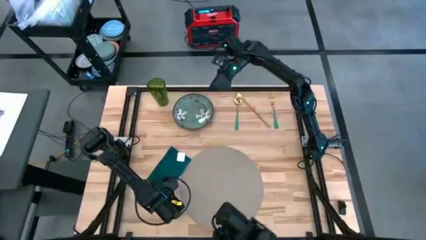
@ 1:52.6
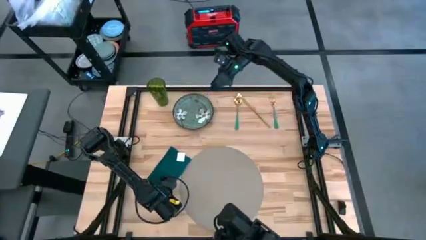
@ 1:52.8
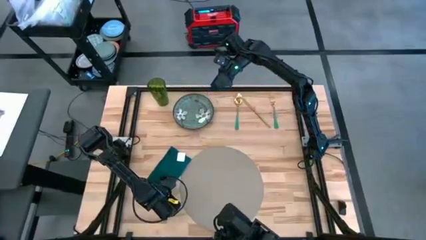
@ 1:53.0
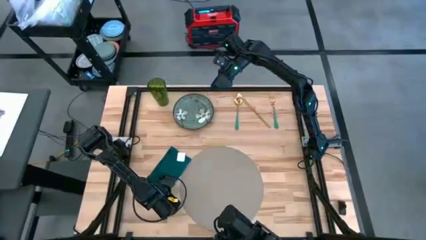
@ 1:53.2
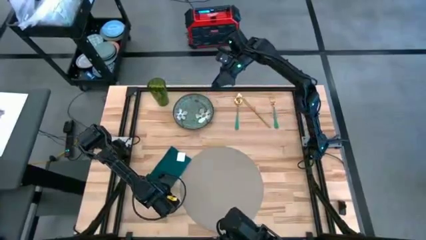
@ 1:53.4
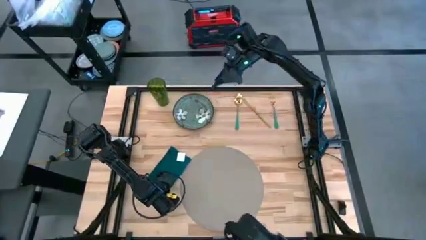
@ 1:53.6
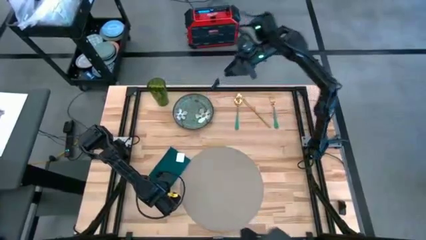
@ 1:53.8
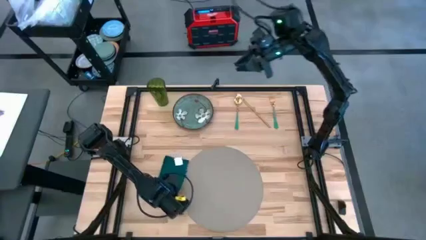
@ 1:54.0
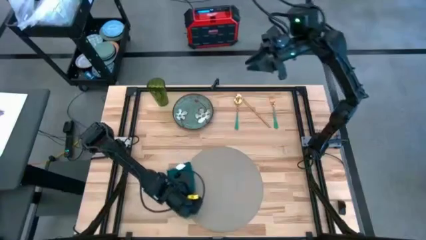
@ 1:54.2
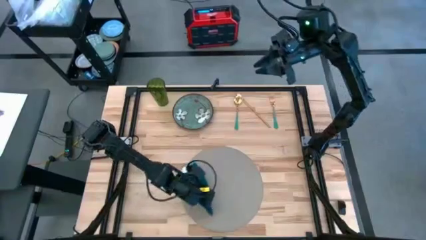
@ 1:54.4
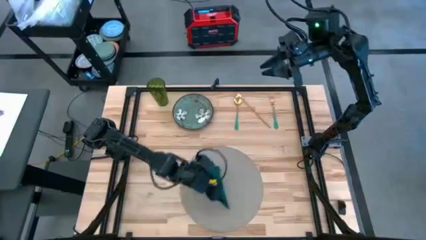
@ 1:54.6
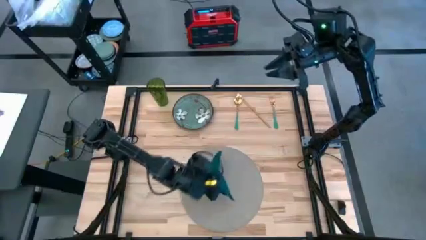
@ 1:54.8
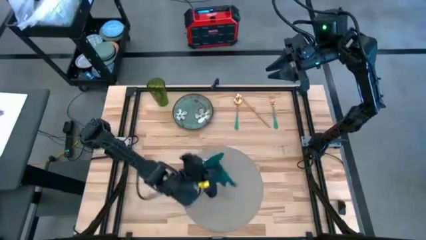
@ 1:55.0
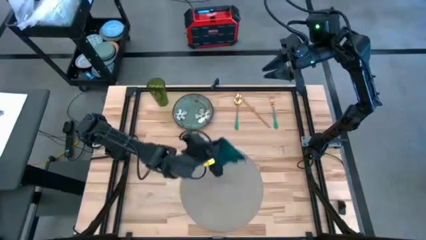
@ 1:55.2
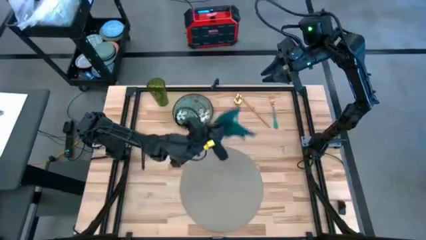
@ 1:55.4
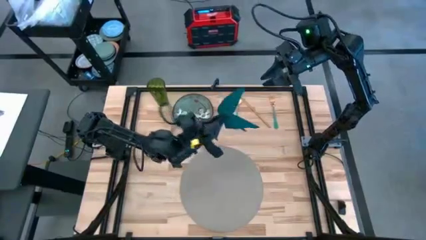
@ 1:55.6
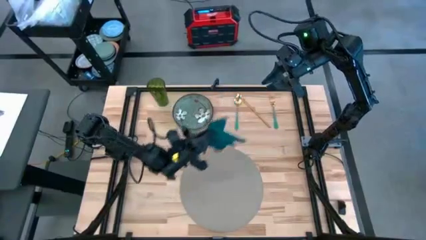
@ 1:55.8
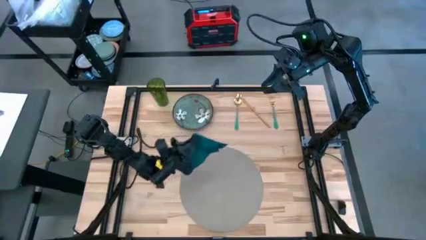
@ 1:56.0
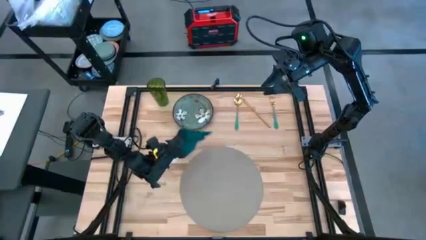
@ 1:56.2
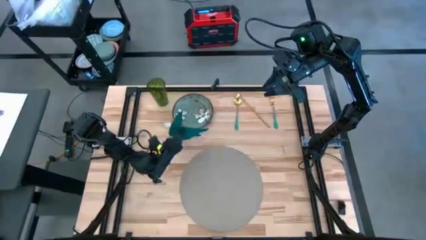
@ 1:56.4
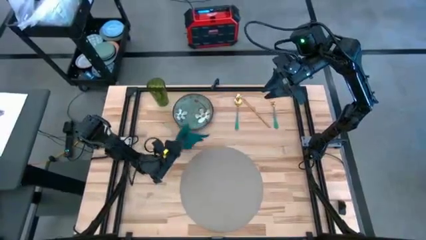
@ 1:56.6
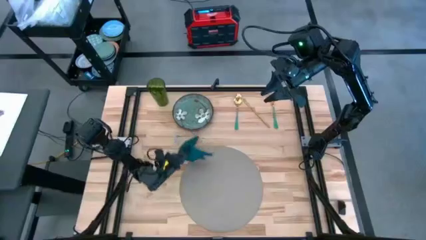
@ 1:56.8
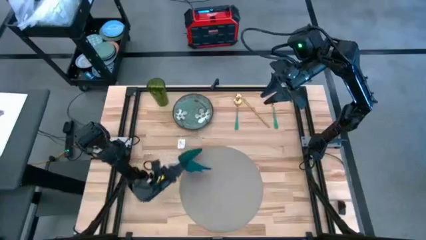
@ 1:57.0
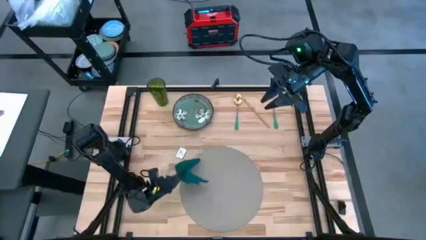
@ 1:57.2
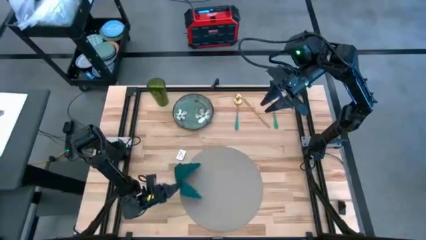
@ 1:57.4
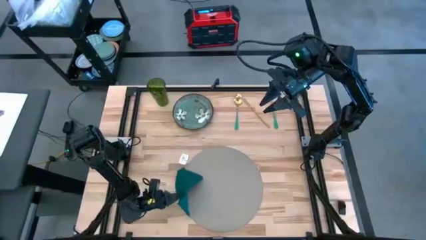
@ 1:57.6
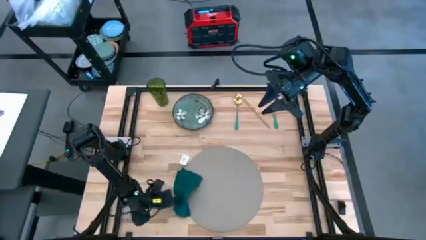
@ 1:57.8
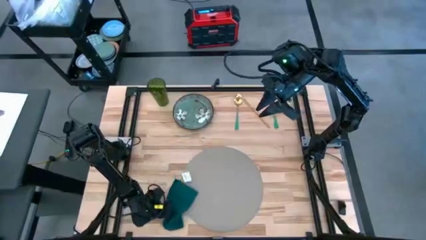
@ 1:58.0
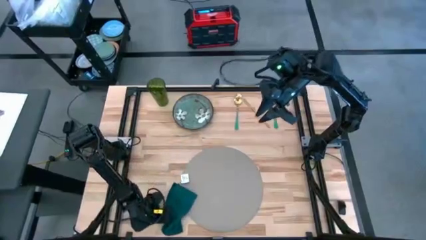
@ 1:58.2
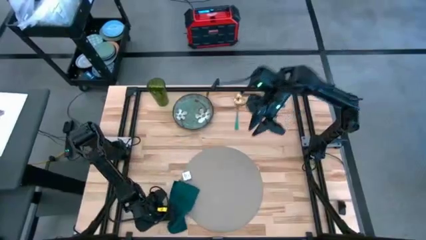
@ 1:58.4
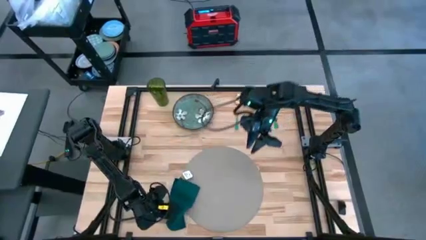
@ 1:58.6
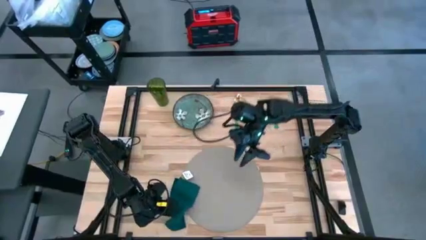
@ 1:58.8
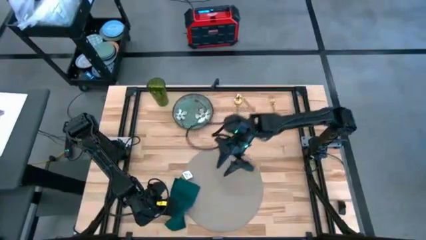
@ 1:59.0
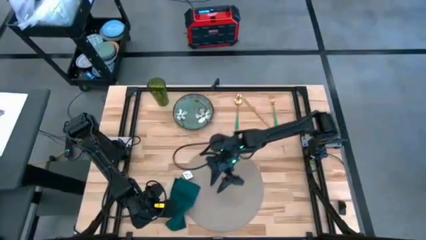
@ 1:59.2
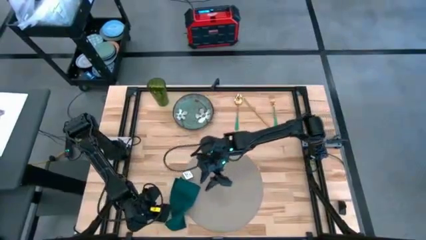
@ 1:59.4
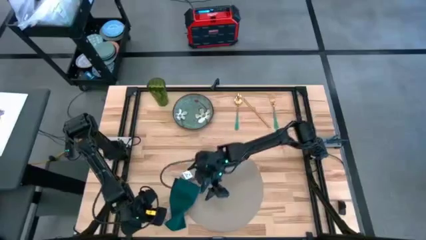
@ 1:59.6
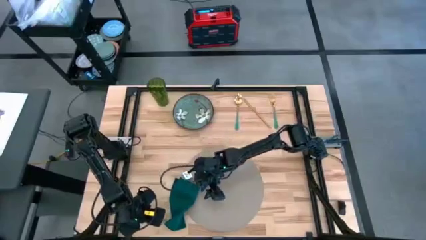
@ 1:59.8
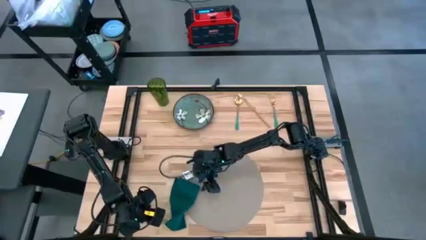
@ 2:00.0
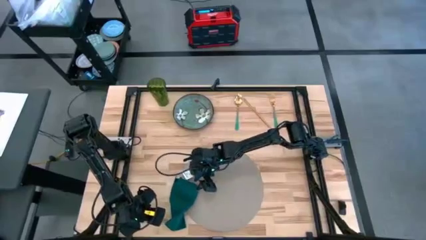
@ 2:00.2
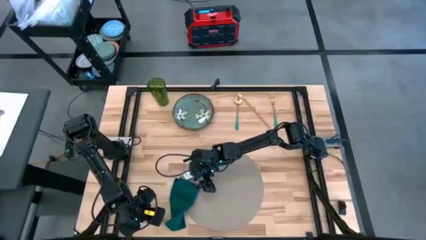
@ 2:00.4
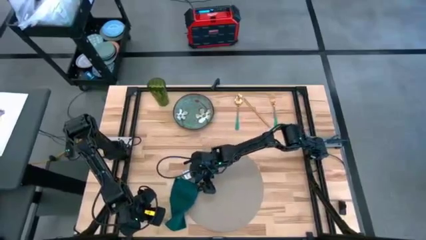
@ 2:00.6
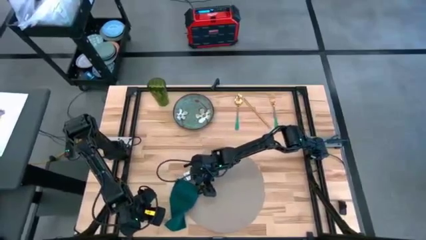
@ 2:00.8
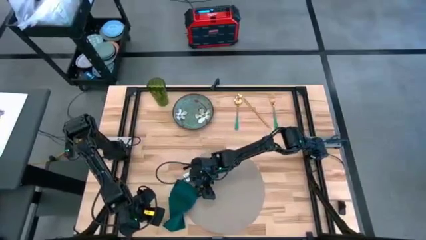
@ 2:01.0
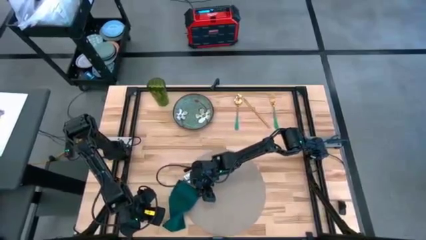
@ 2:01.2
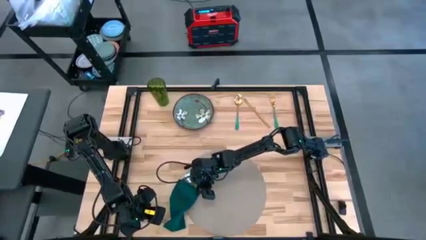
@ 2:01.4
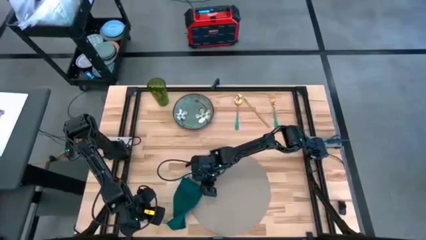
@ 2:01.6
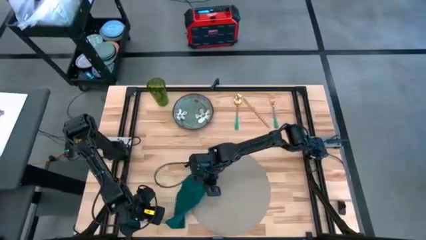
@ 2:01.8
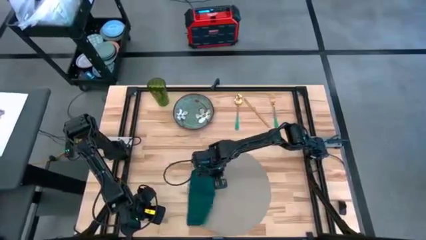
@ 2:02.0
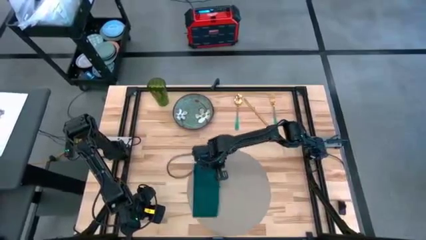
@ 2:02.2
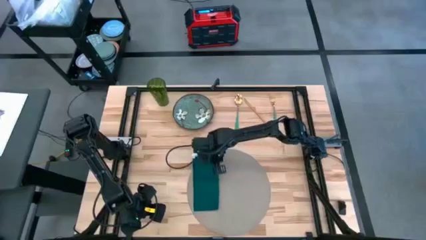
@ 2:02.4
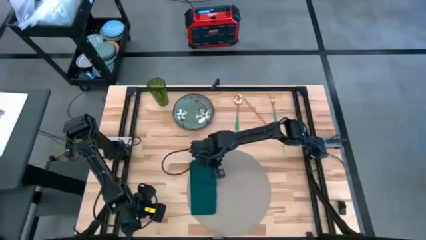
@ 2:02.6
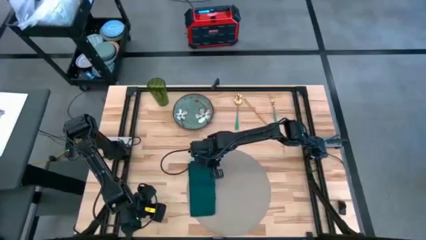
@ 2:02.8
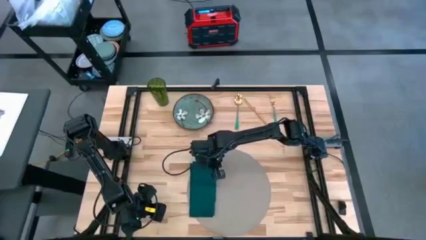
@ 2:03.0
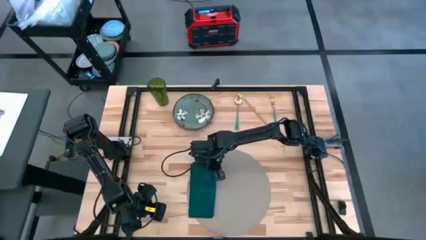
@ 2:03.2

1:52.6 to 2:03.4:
Task: Set table place
Put the green napkin on the gray table mat

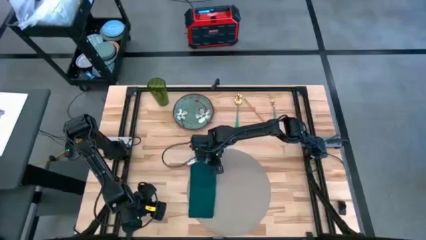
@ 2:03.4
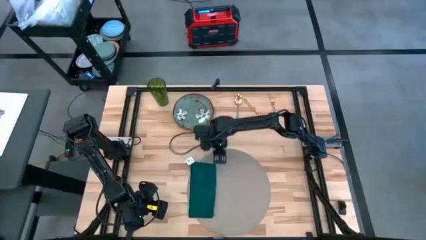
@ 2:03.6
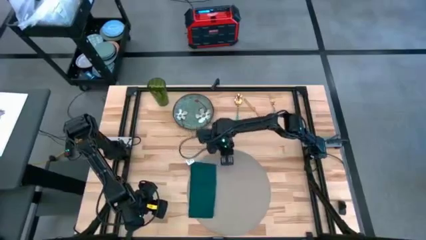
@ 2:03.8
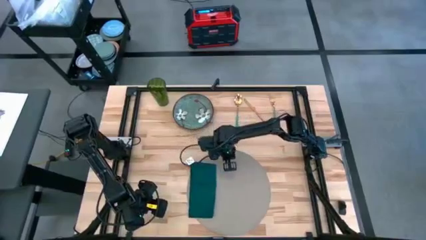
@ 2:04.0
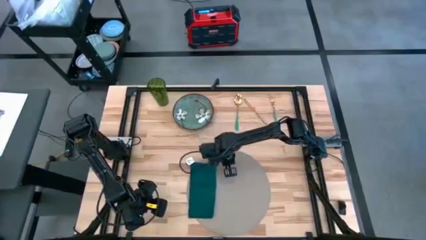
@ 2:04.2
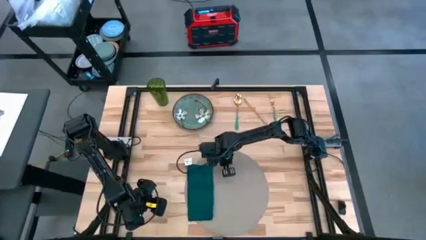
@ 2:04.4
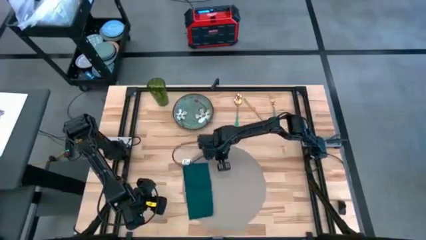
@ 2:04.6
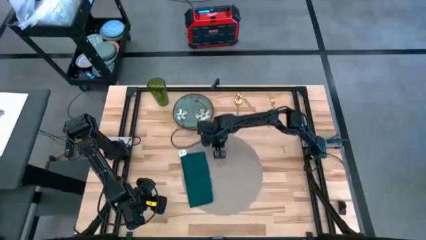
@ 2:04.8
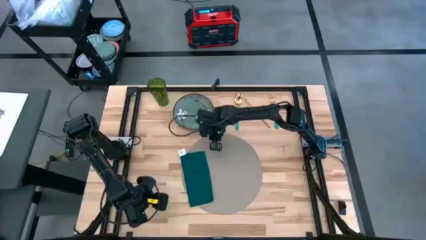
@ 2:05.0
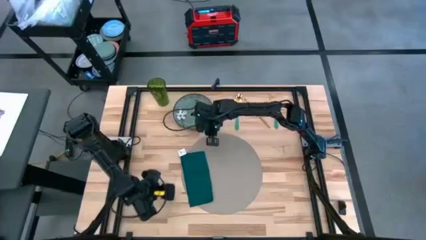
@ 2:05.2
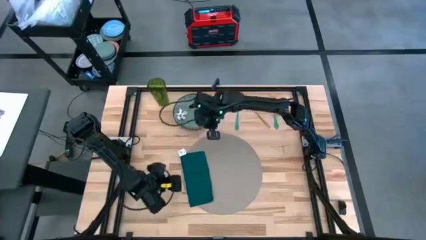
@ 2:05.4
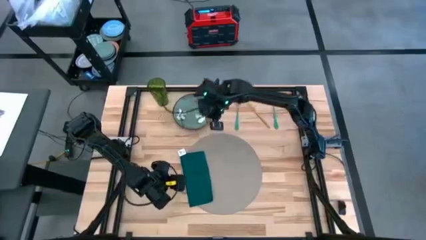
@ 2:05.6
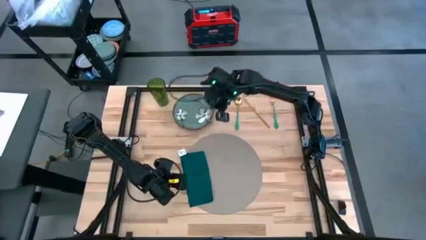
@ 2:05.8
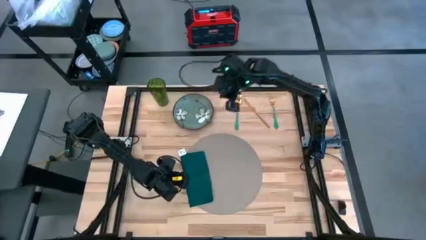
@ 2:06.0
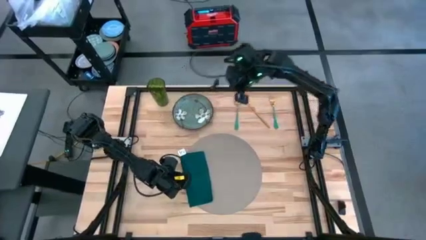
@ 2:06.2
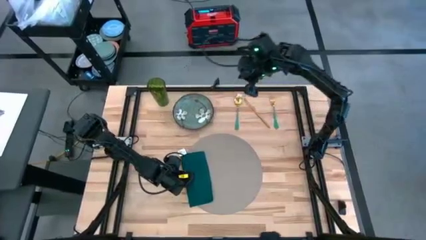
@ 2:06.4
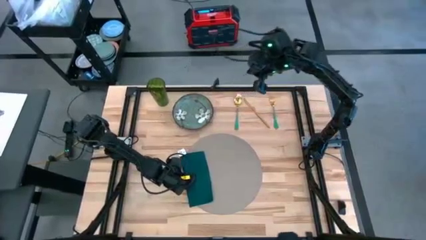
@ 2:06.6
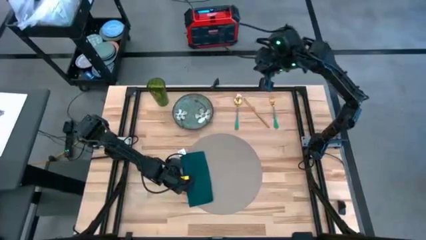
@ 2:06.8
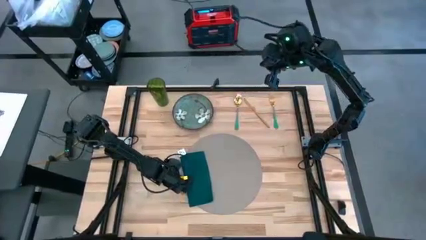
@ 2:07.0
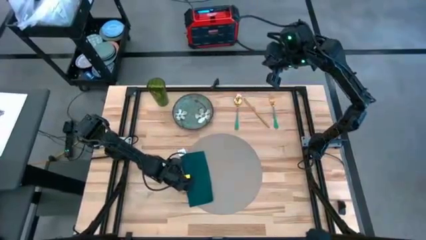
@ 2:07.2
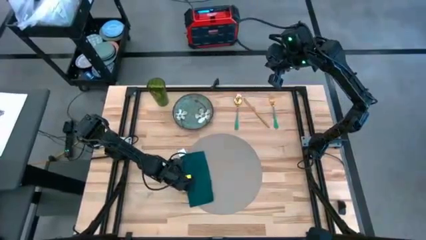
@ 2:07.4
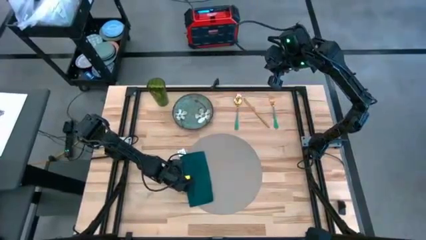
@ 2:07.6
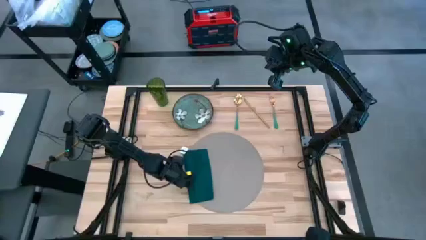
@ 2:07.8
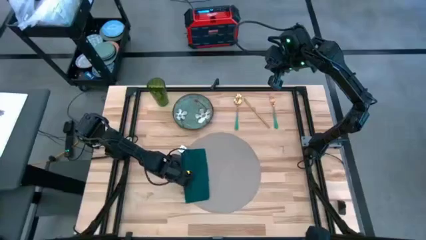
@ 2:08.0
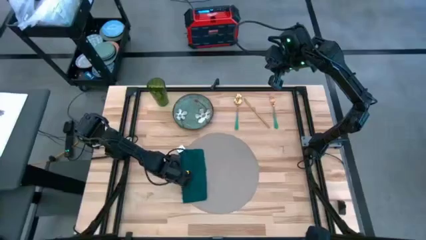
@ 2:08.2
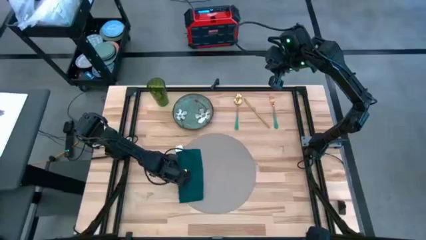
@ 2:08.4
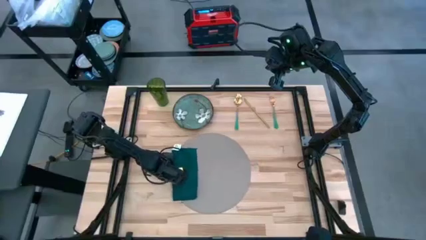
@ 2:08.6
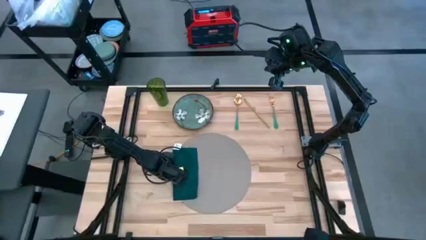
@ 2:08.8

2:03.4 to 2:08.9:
Move the gray table mat to the center of the table

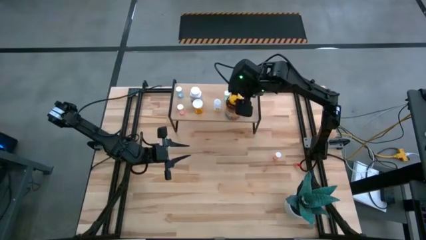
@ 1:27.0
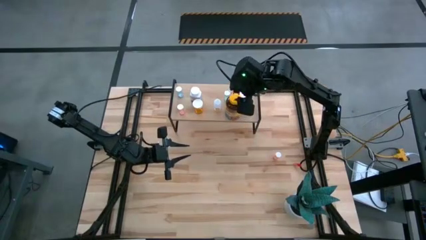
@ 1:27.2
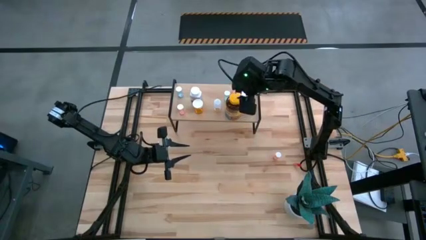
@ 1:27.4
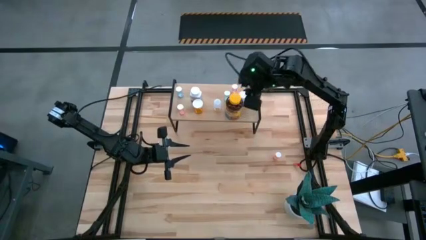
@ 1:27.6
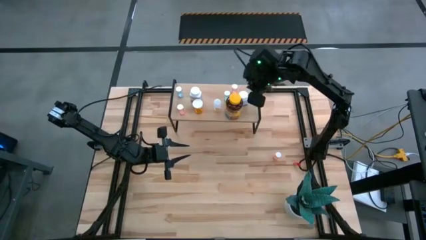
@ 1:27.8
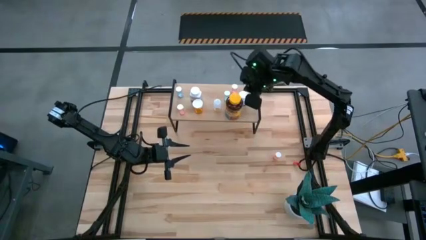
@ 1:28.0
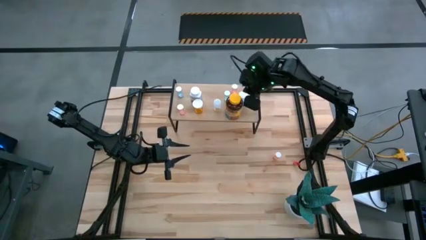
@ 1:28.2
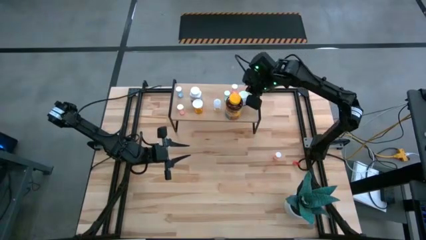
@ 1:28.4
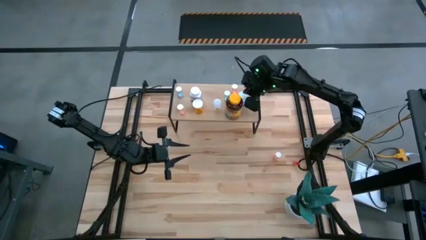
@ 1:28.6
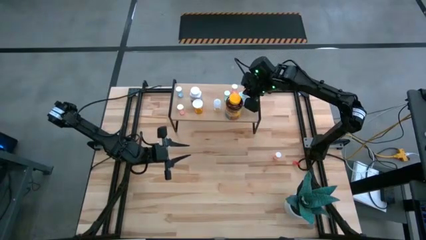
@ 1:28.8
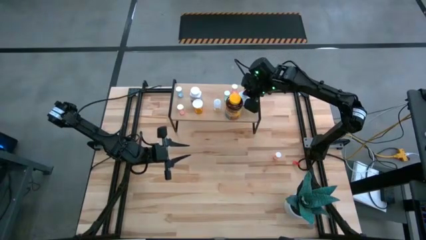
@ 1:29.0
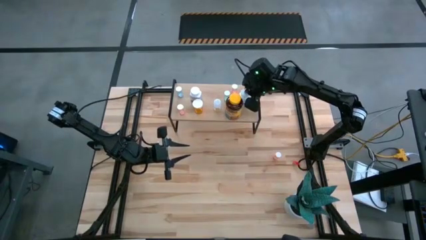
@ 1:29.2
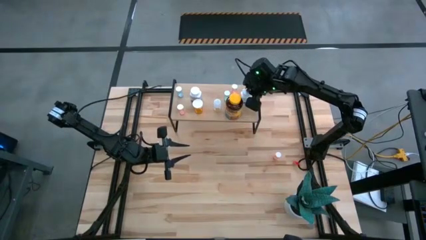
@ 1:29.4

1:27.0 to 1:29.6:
Task: Pick and place medicine bottles onto shelf by color
Adjust the white pill bottle on the shelf
